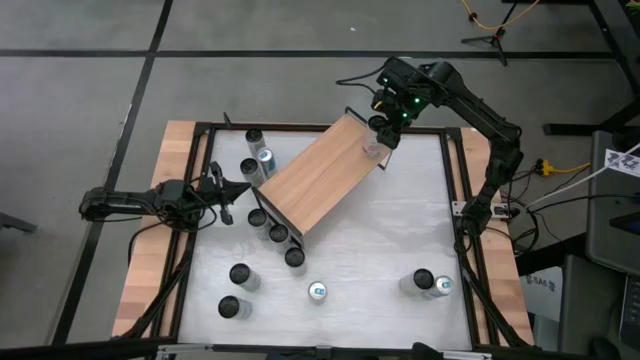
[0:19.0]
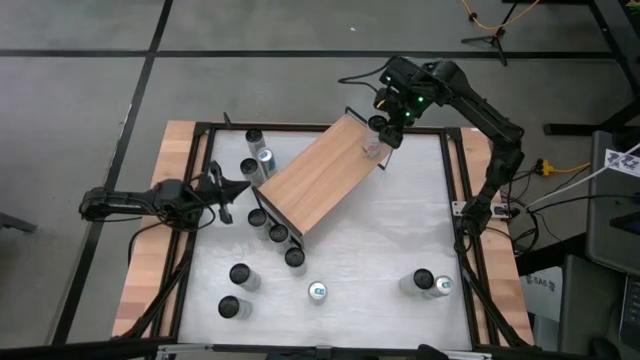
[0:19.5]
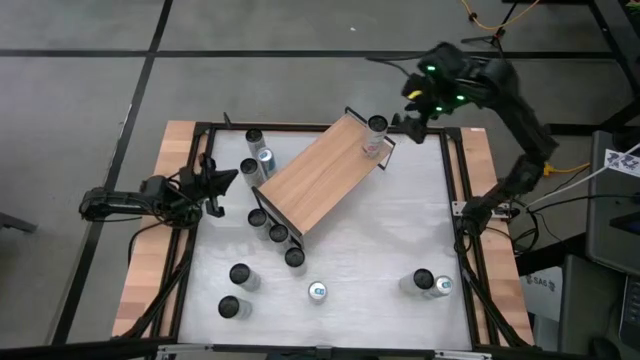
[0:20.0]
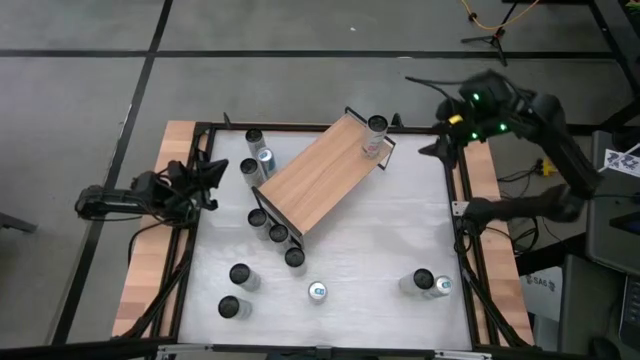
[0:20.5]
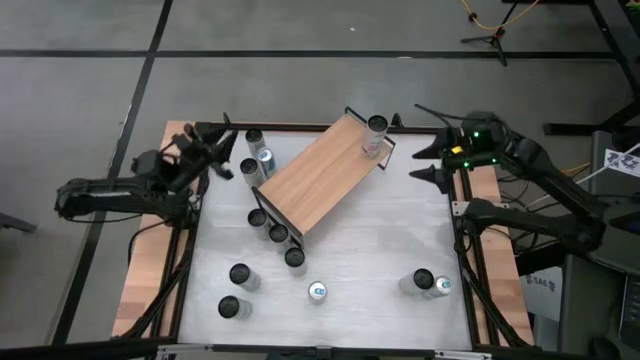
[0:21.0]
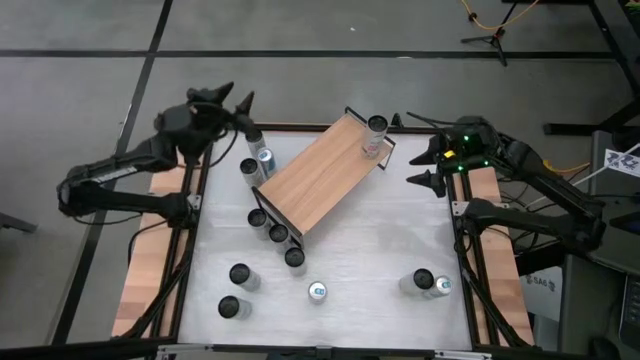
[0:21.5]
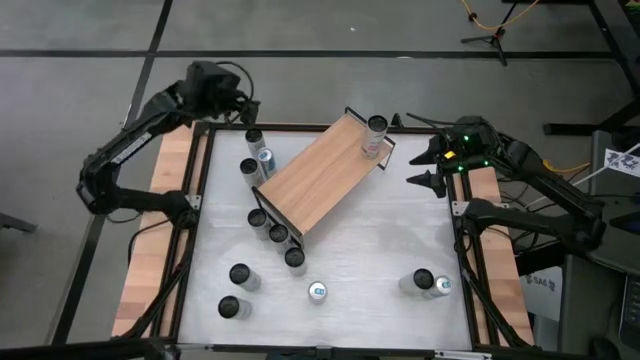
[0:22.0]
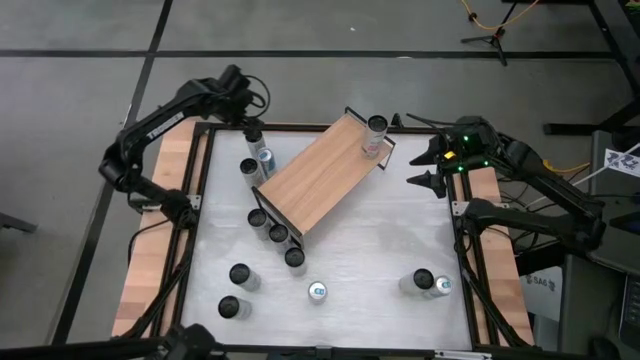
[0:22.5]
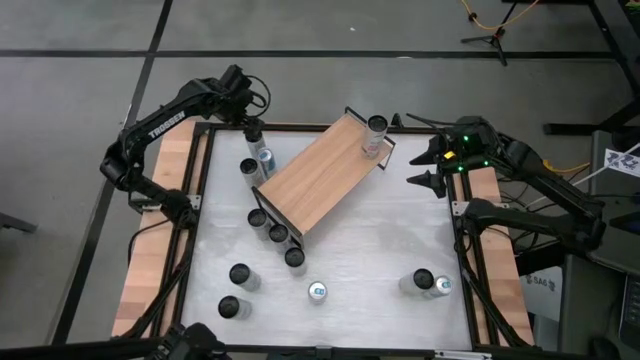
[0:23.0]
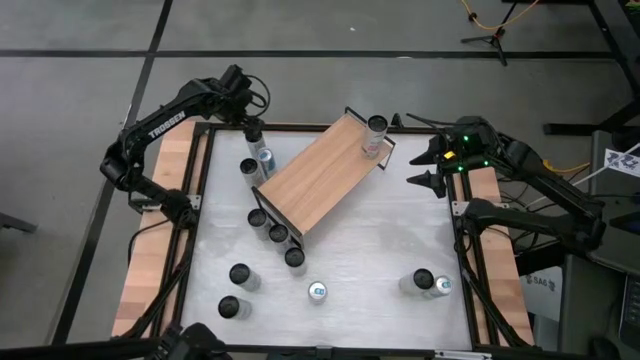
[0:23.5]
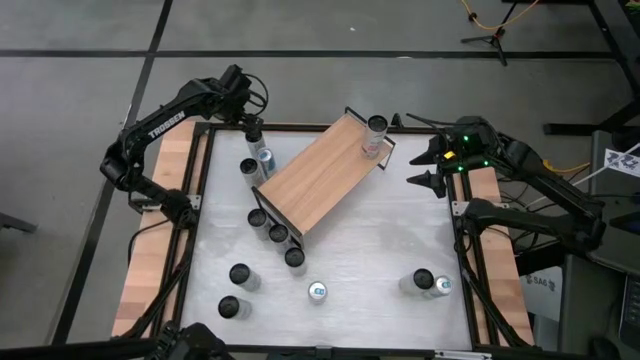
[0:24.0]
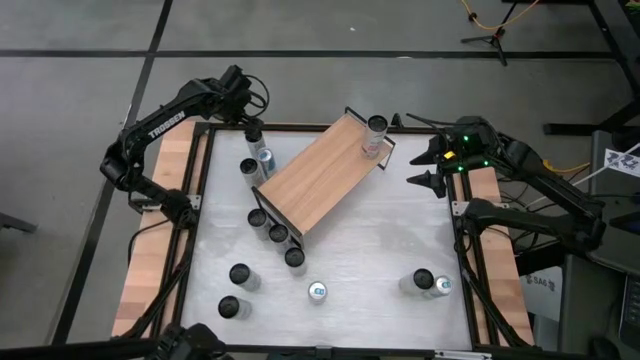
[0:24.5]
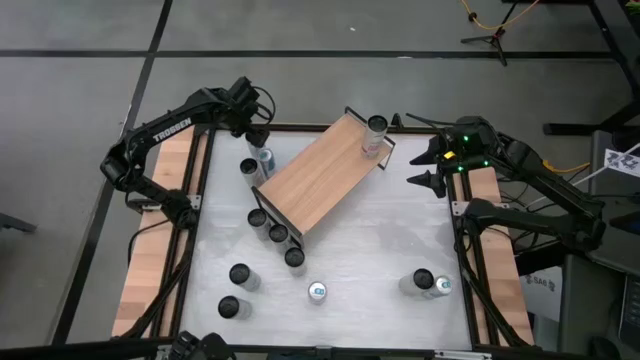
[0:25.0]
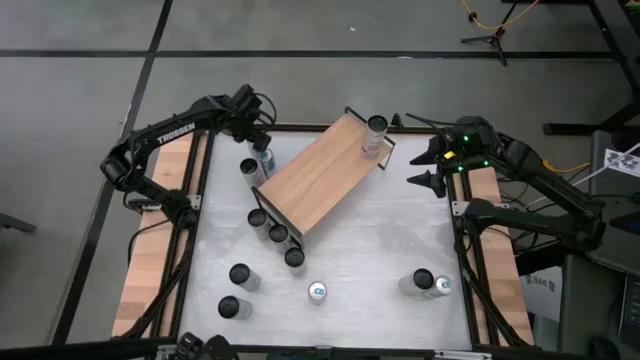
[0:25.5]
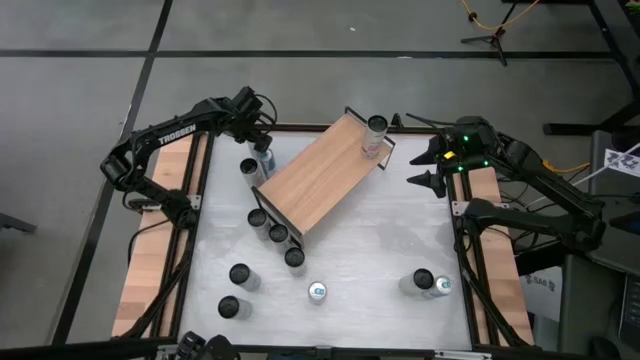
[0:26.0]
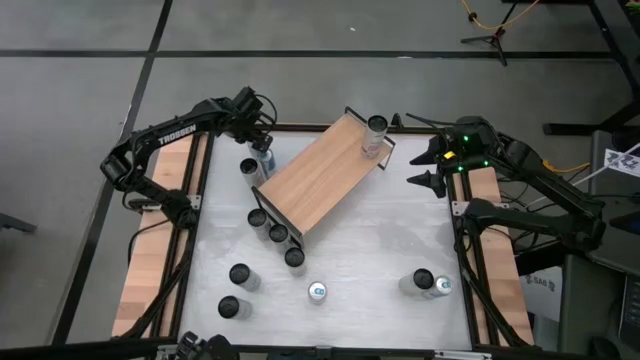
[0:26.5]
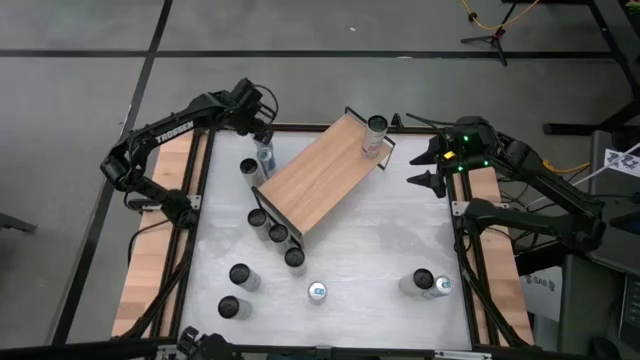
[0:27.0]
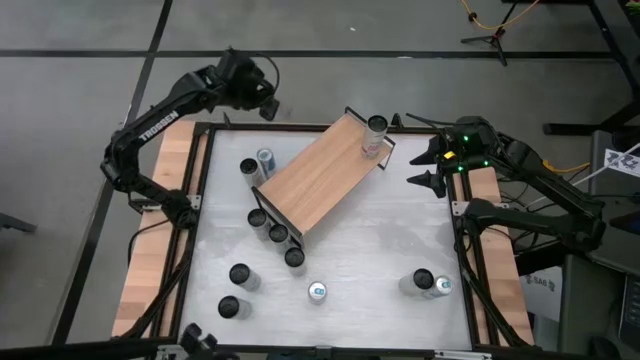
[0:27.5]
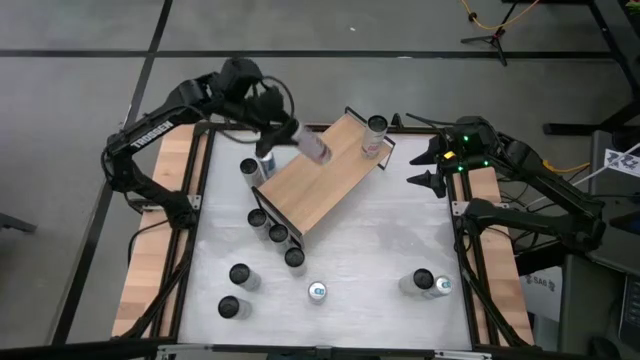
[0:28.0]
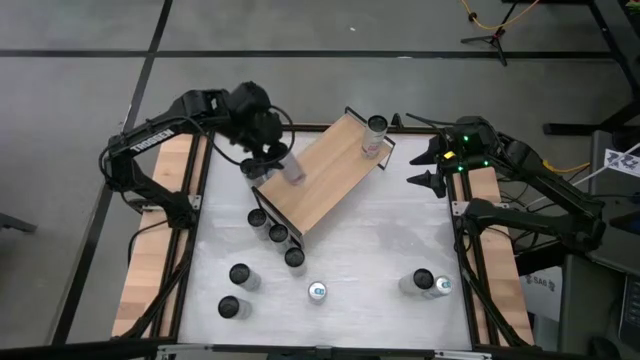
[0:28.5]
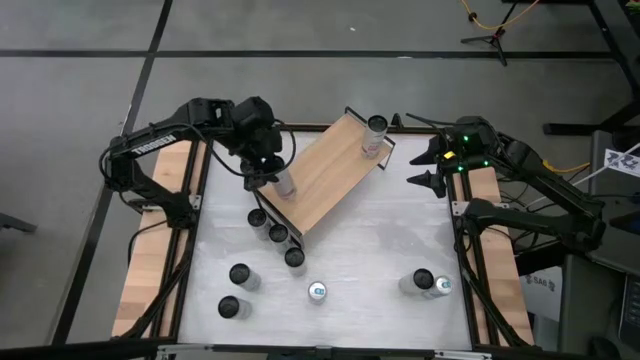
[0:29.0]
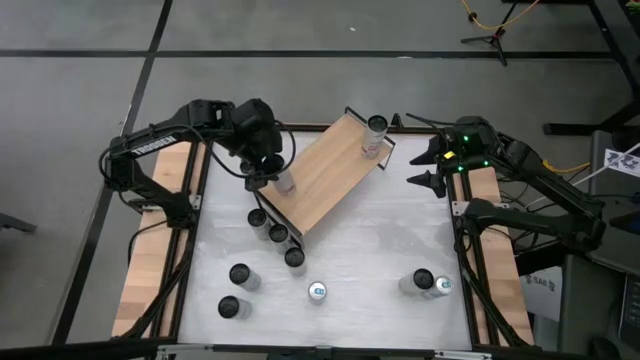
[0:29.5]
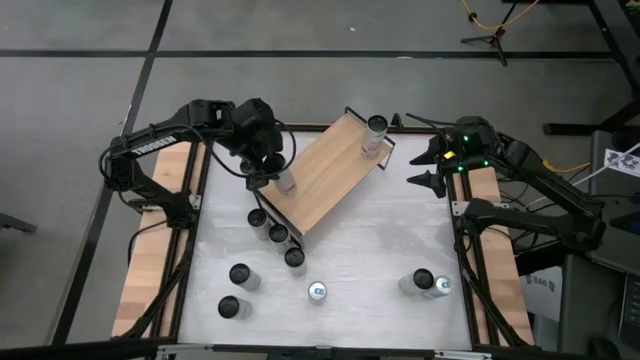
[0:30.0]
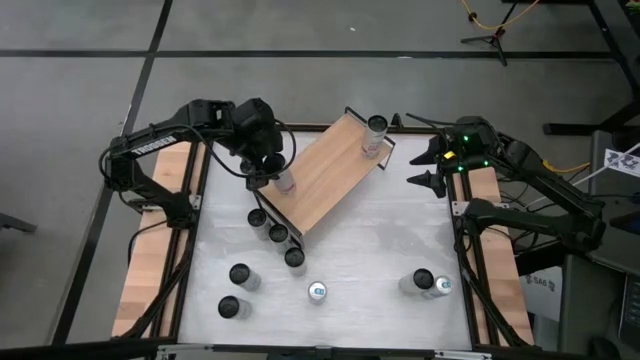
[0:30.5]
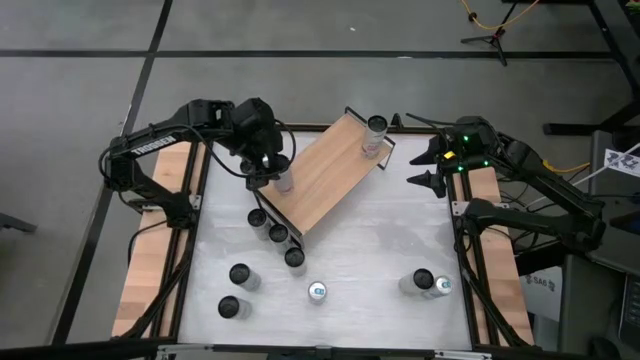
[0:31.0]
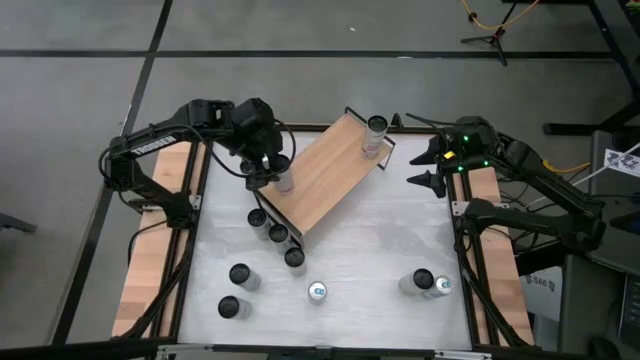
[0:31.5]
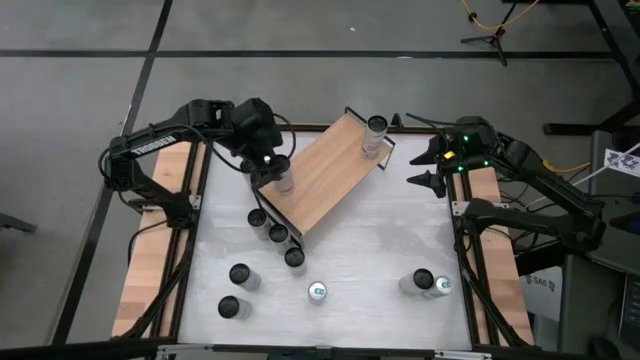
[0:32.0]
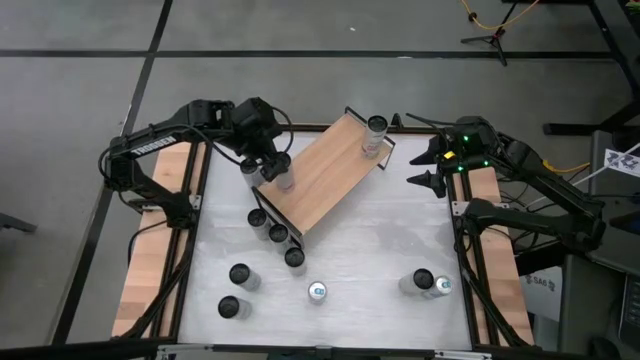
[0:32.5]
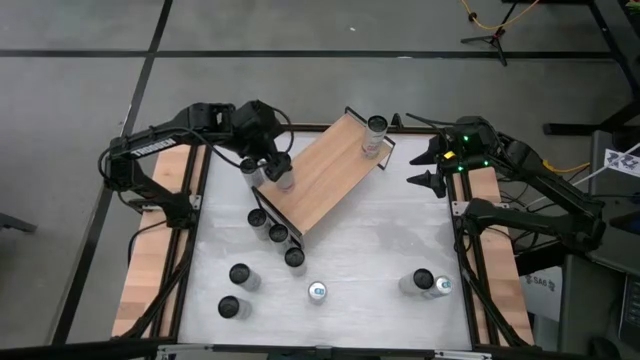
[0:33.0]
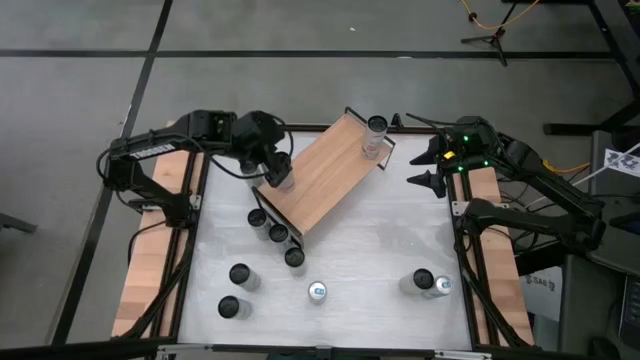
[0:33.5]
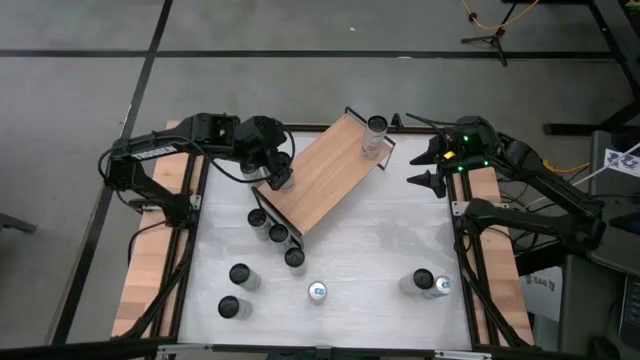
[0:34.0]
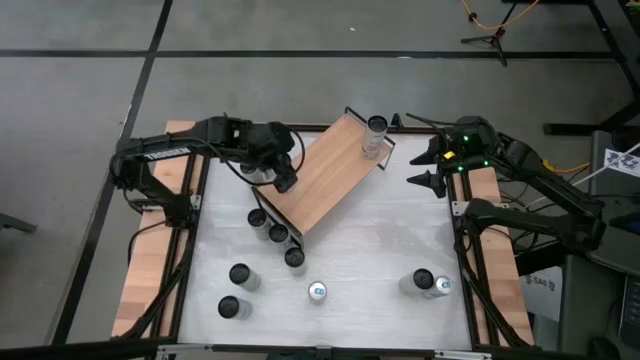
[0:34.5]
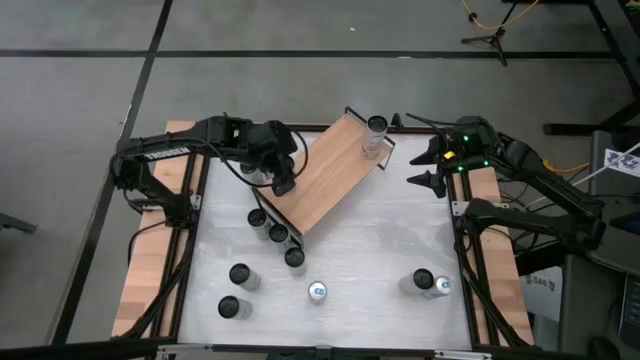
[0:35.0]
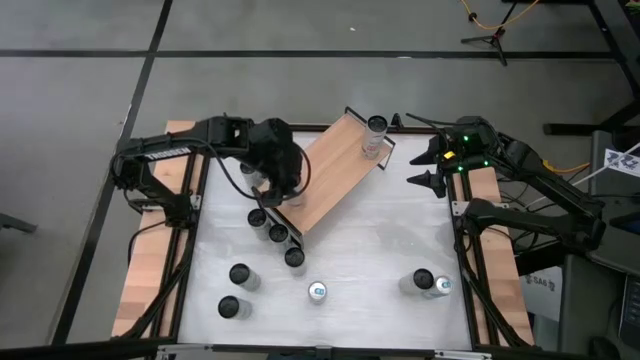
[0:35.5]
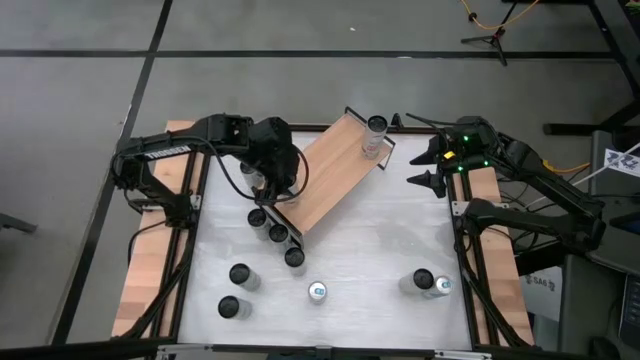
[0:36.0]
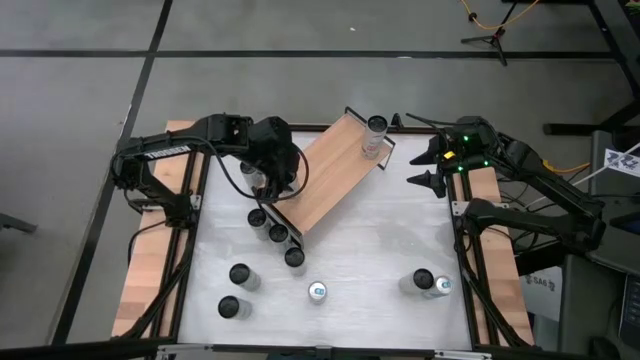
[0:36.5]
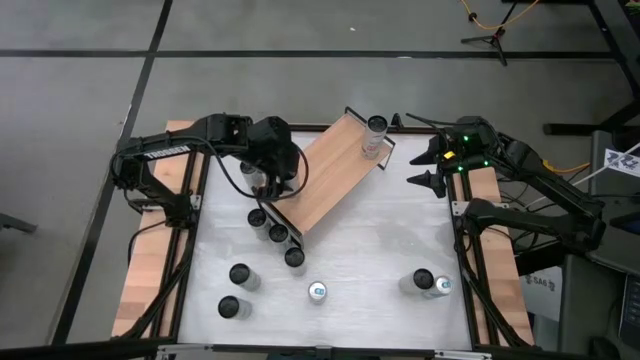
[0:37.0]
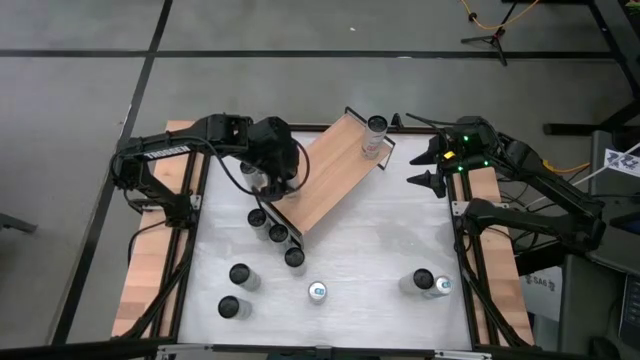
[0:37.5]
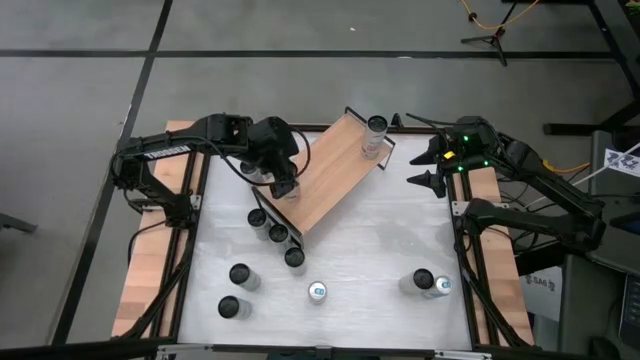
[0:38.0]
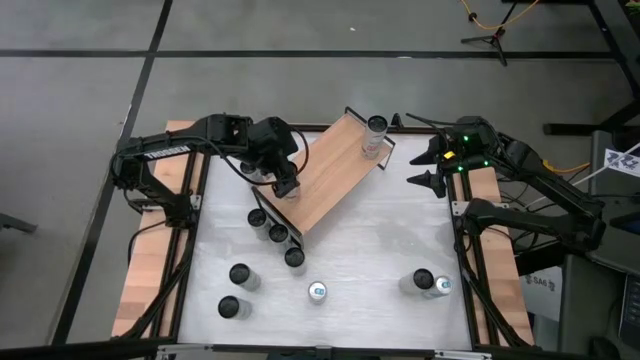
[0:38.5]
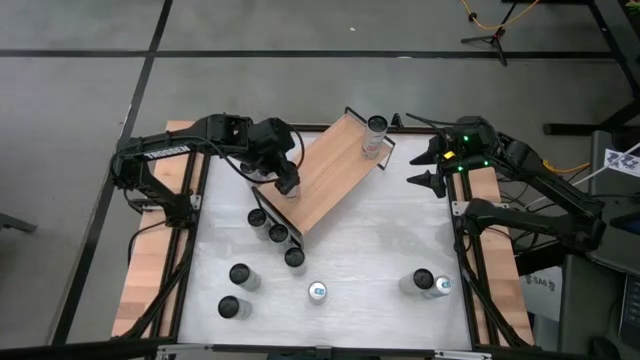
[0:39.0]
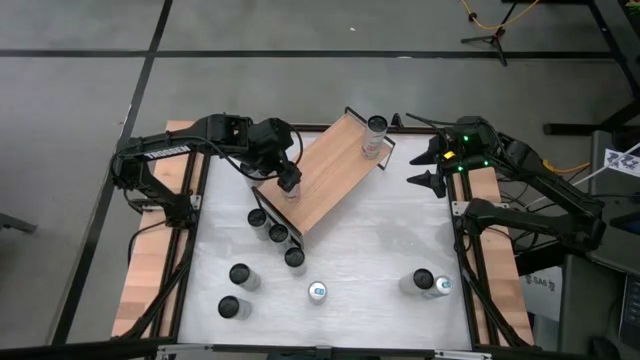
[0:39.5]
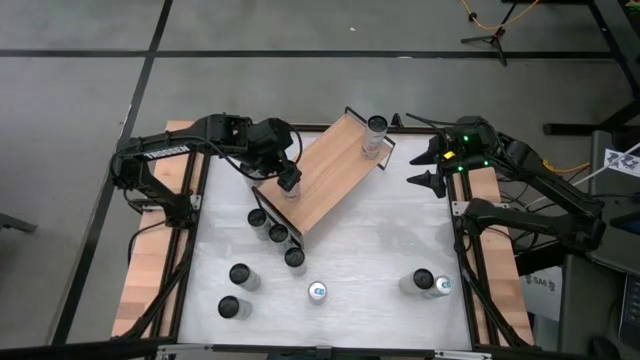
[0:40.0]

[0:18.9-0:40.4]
Task: Place canned beverage on shelf
Put the white-pink soda can on the shelf aligned with the other white-pink soda can
